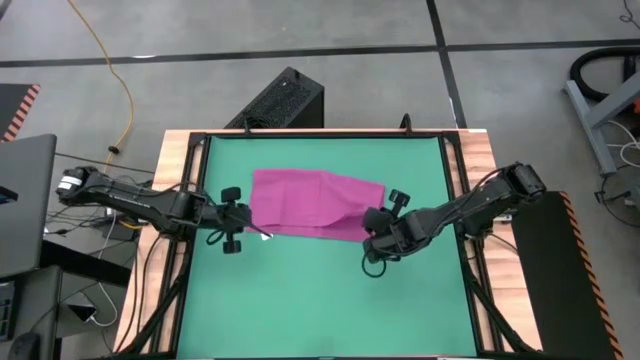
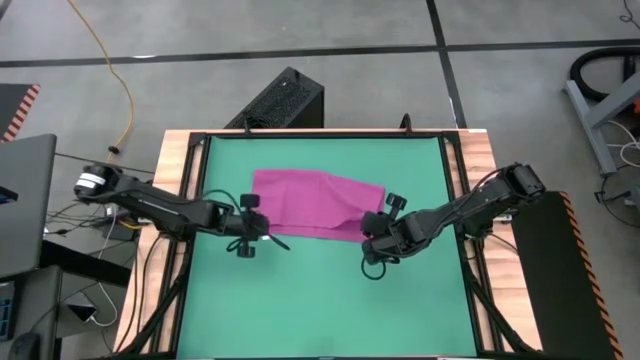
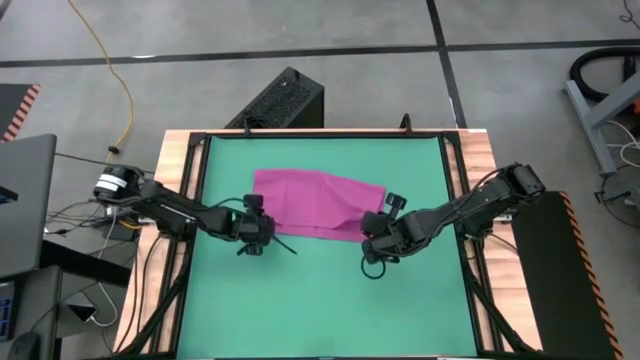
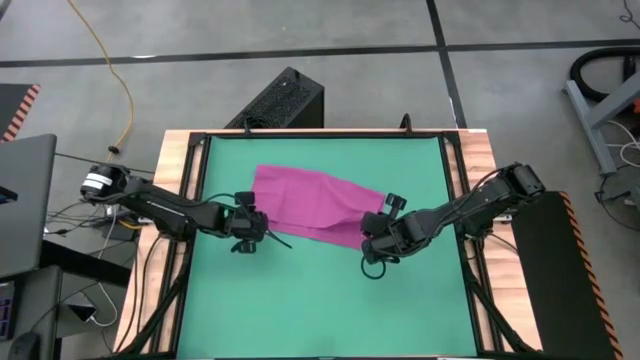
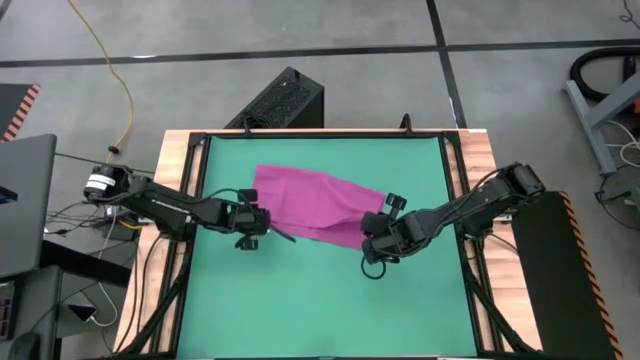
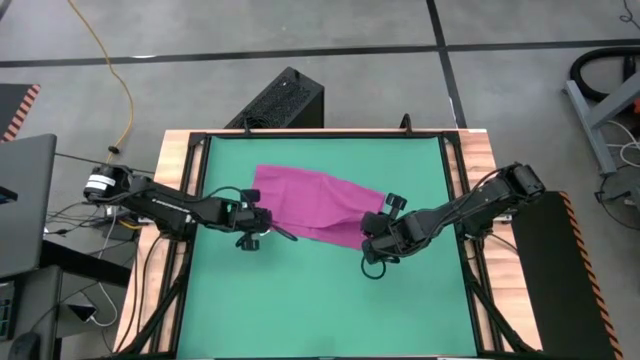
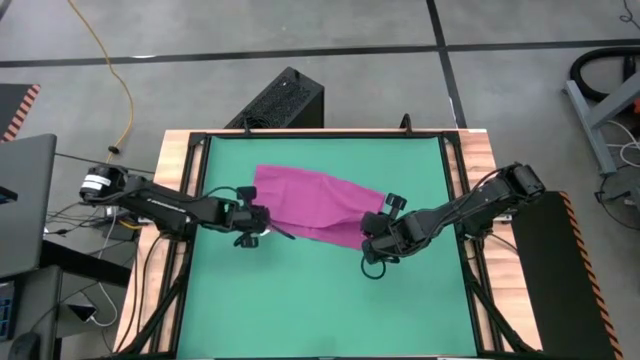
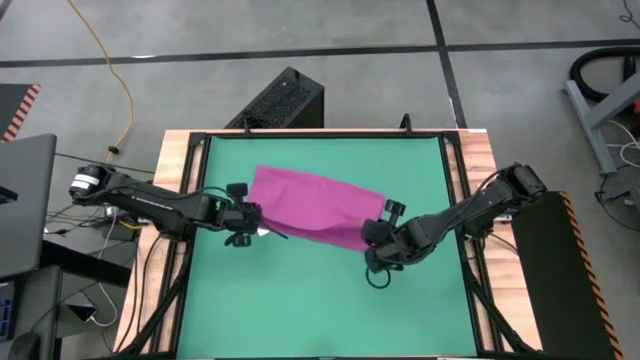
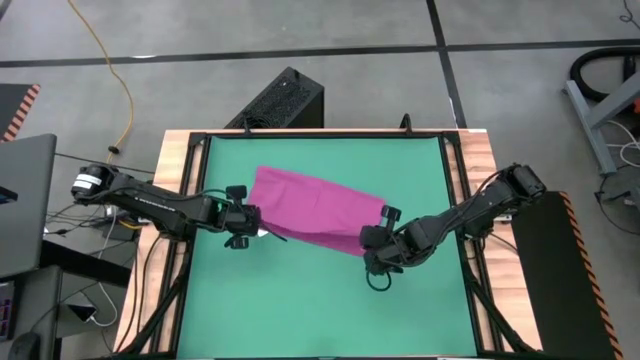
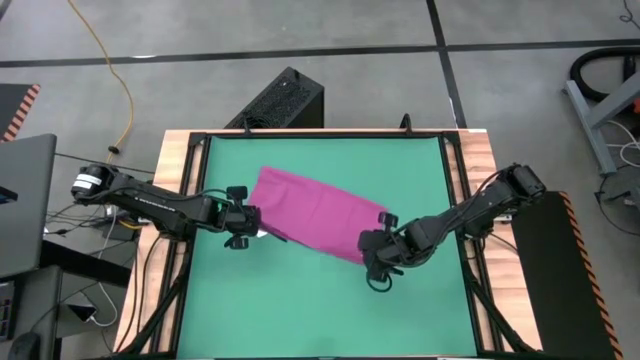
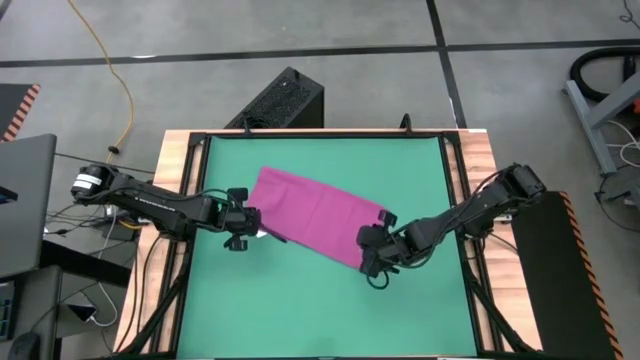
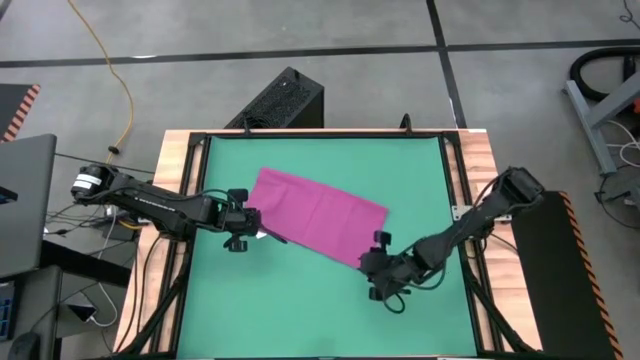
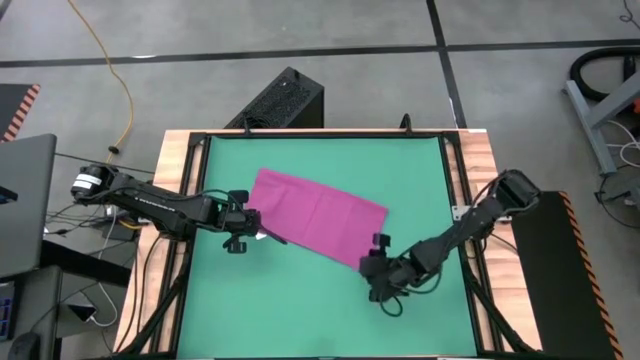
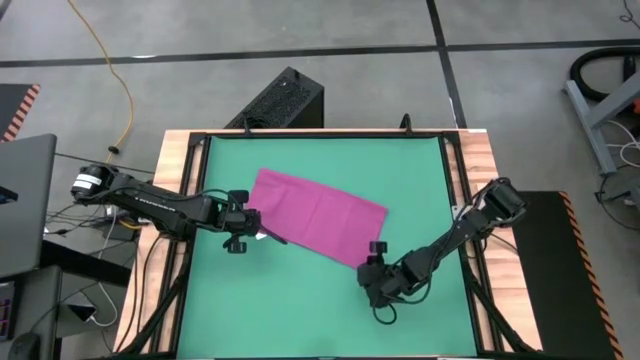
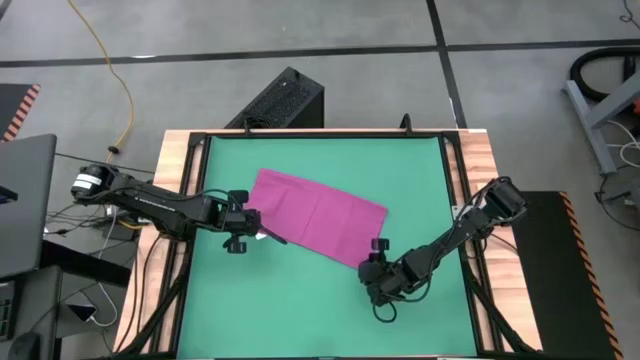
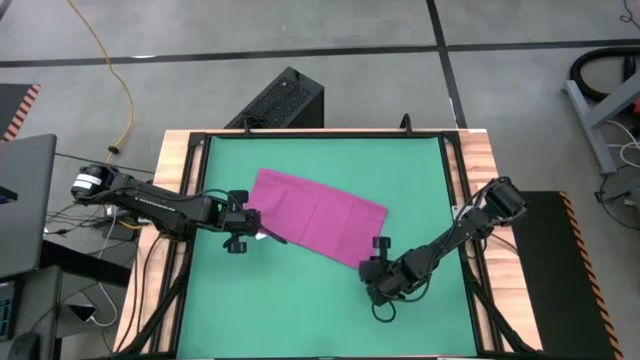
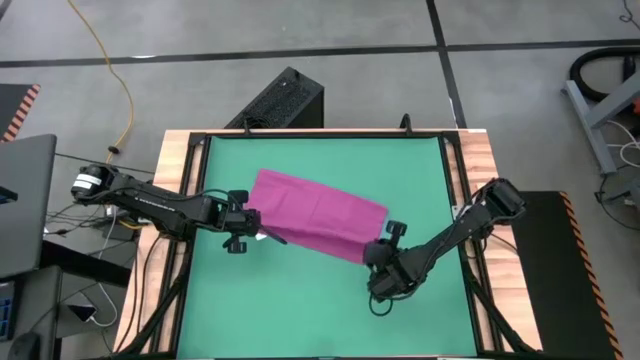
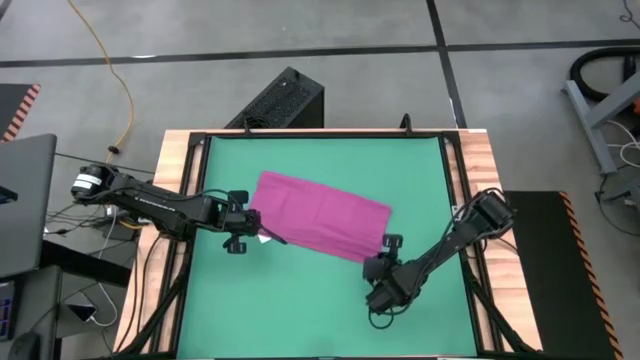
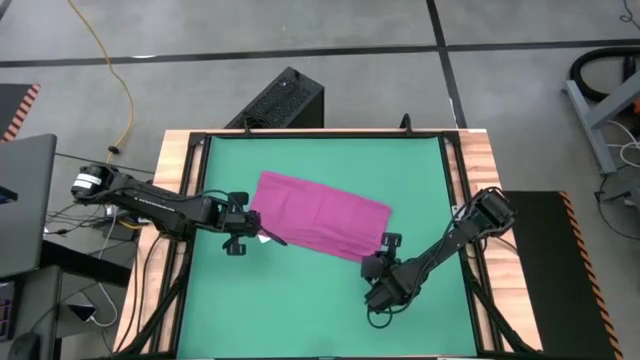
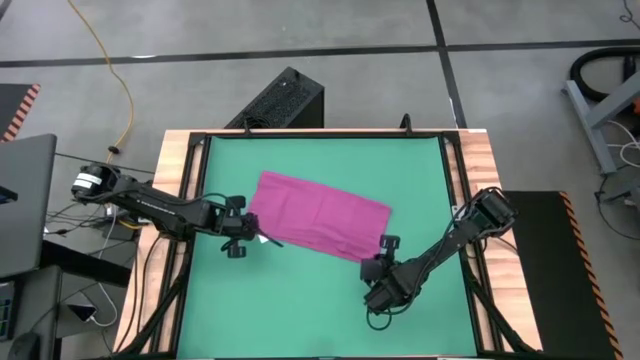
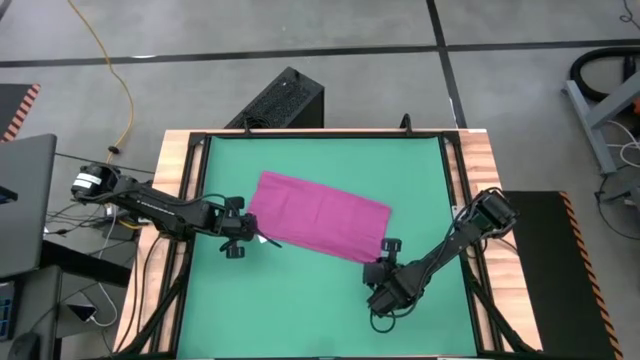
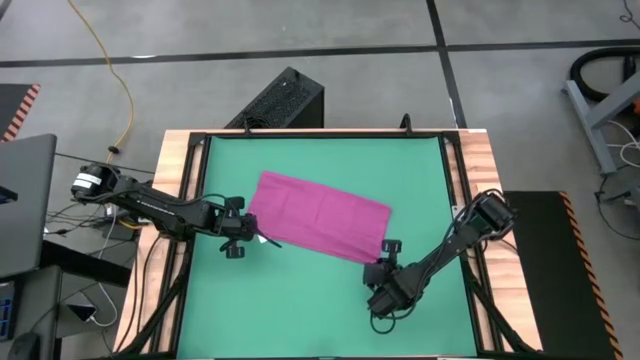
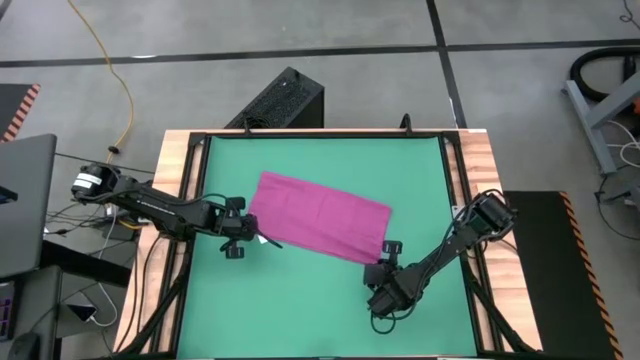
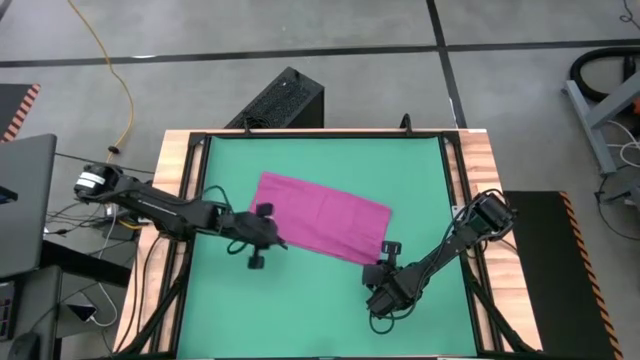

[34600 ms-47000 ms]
Task: Roll towel into tight, uniform cylinder
Fold the pink towel

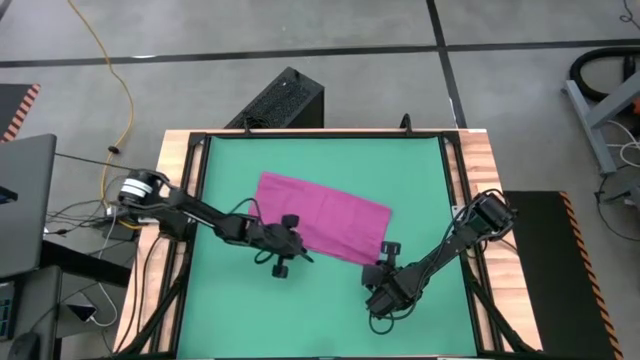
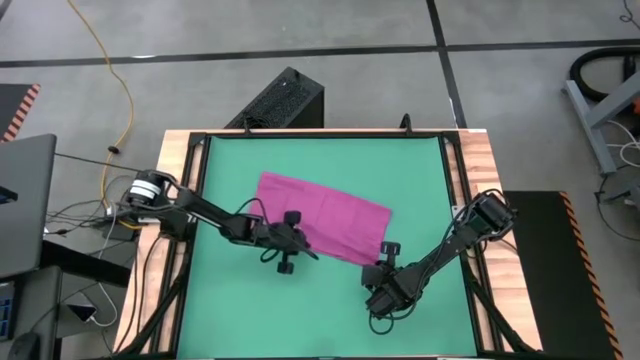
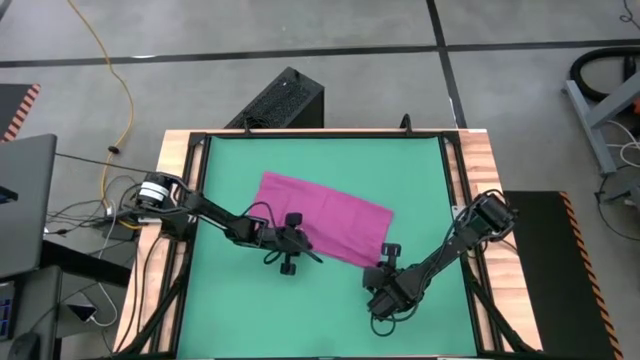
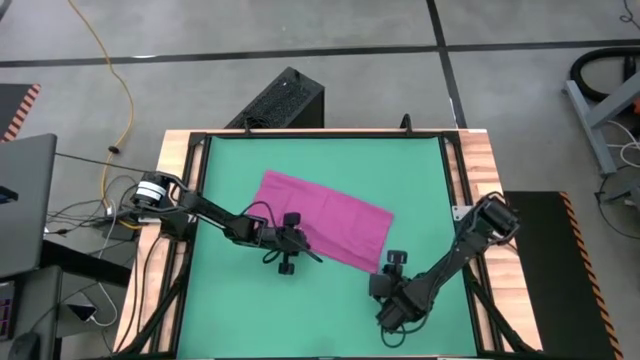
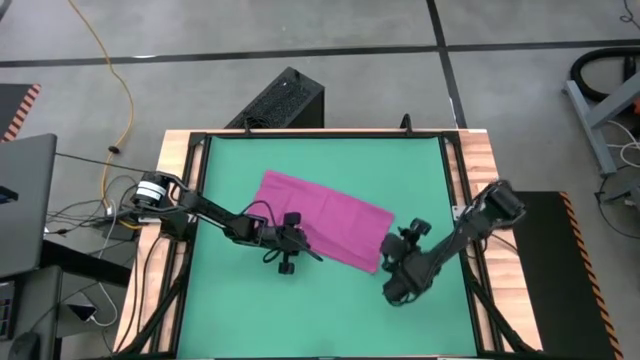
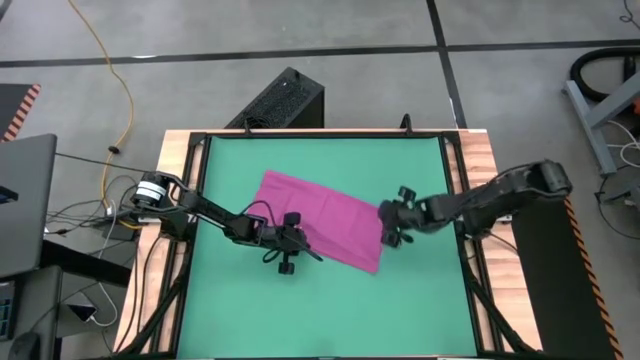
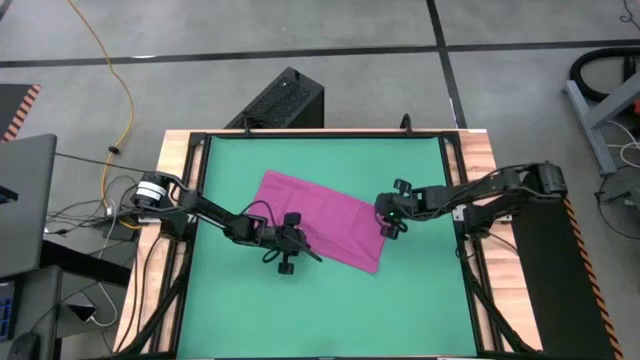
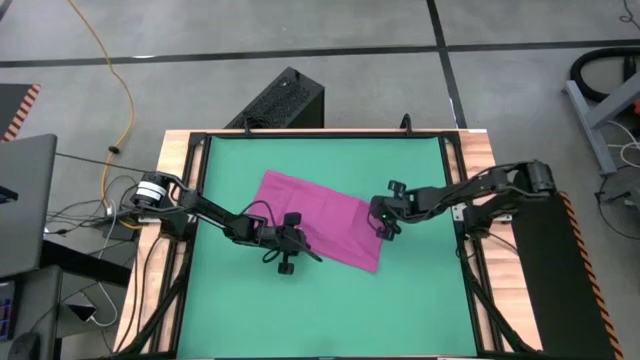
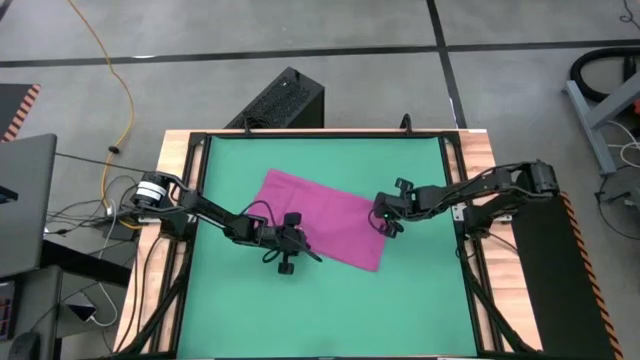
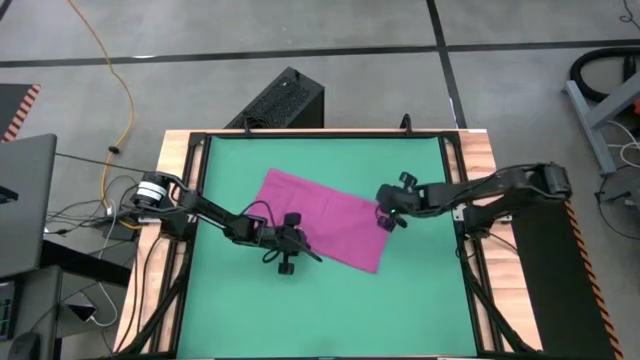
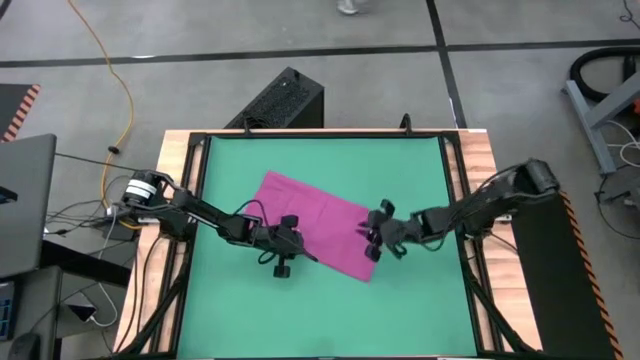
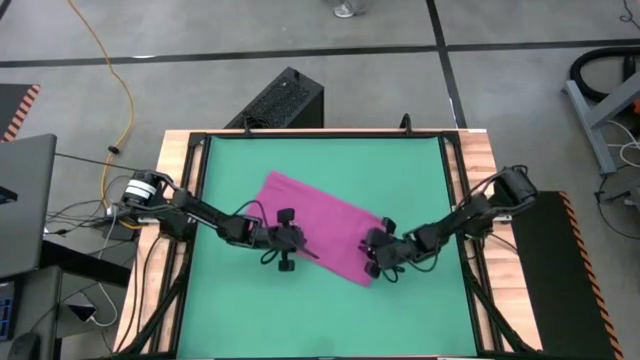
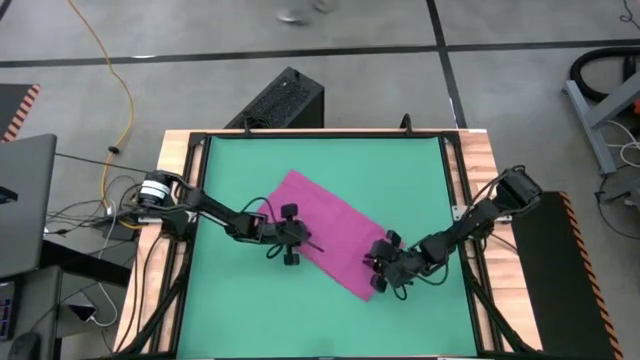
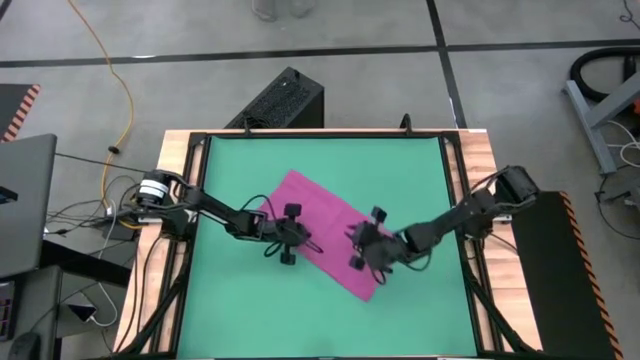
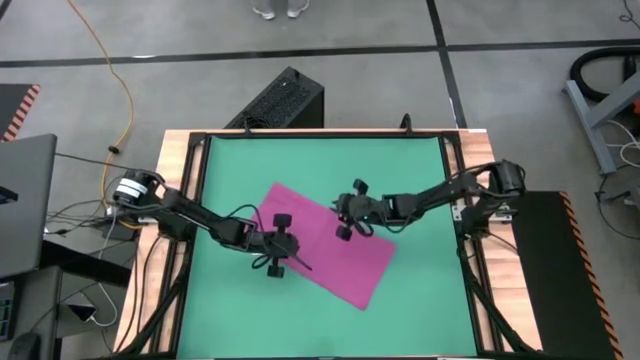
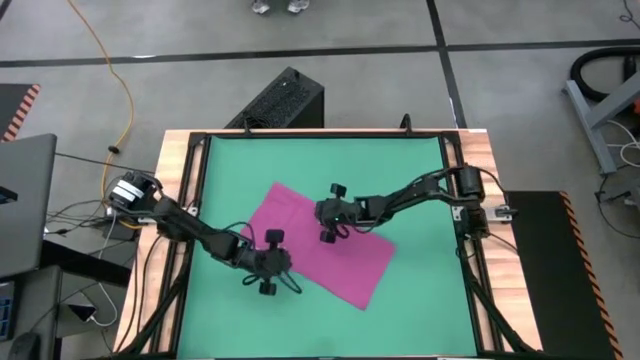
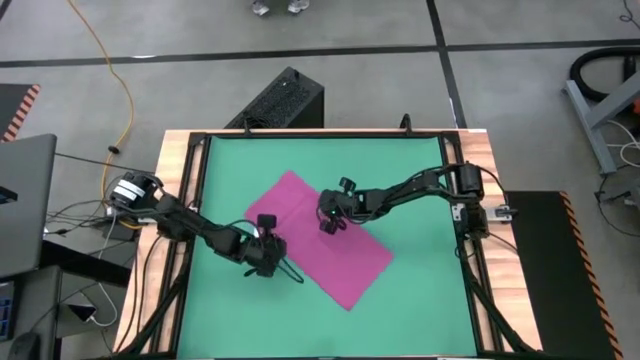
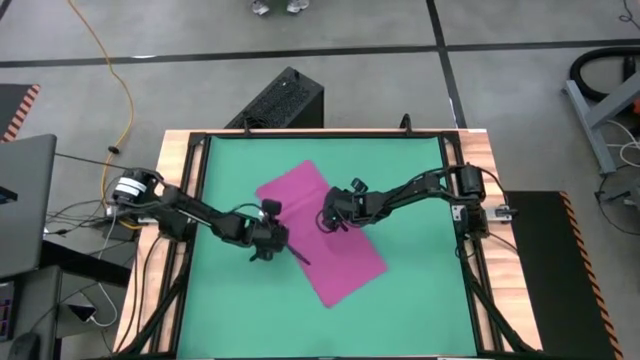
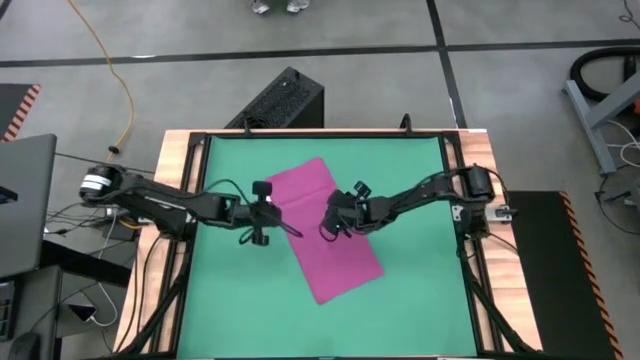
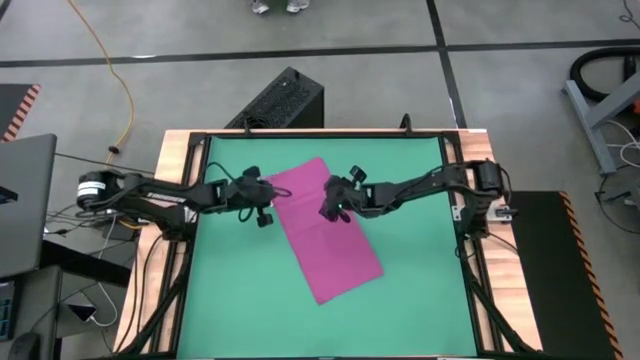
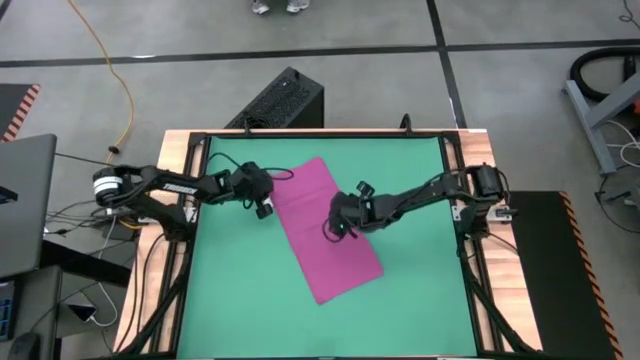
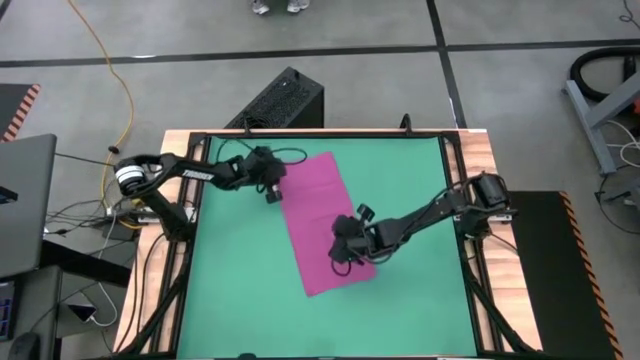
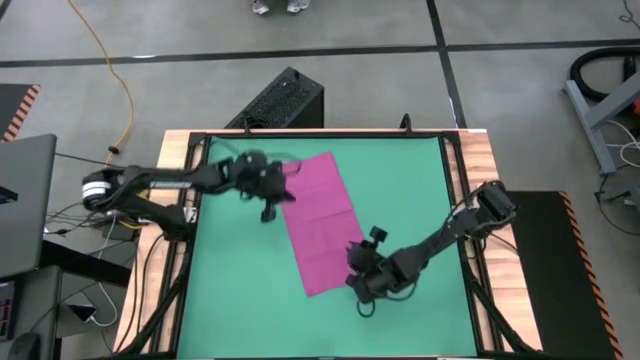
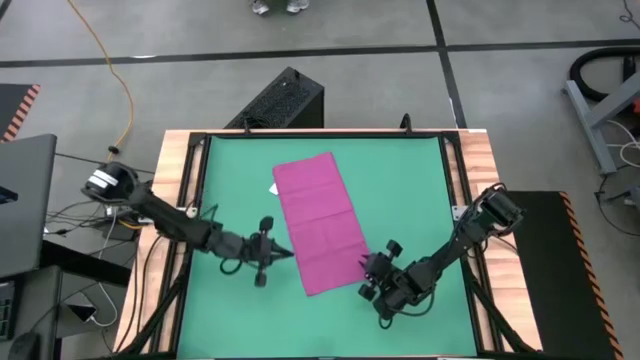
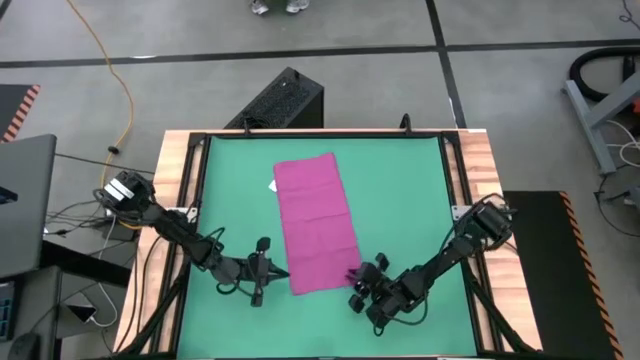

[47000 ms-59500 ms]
Fold the pink towel
